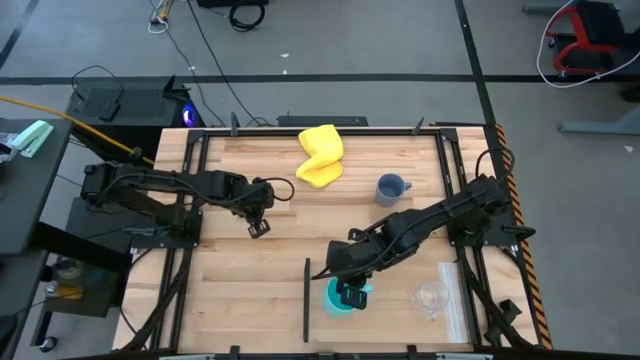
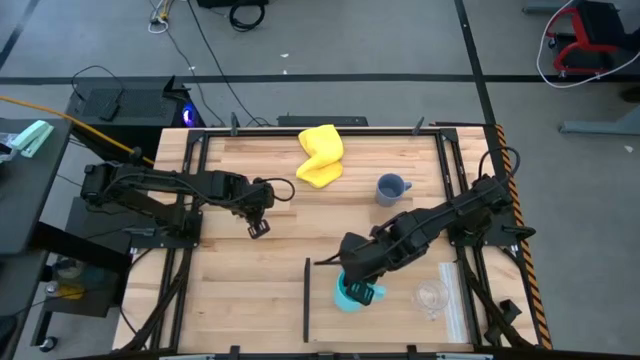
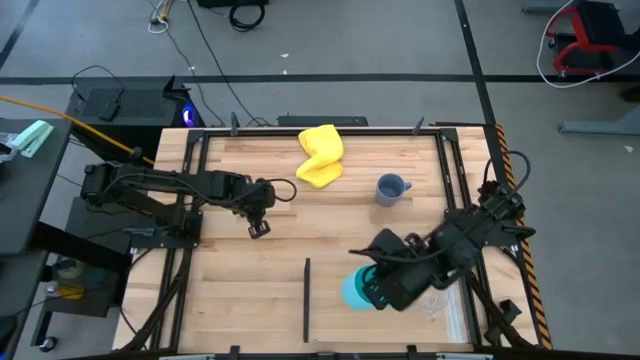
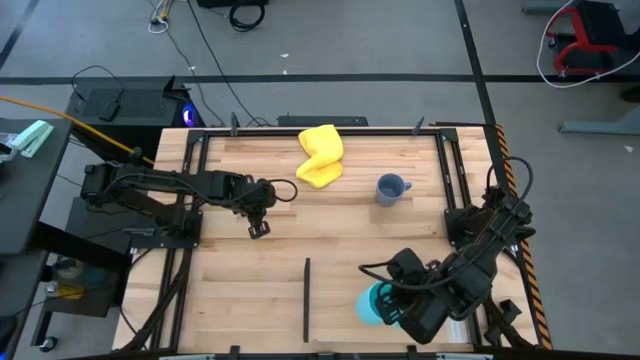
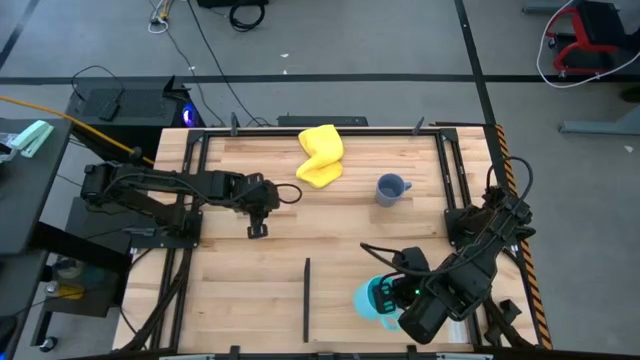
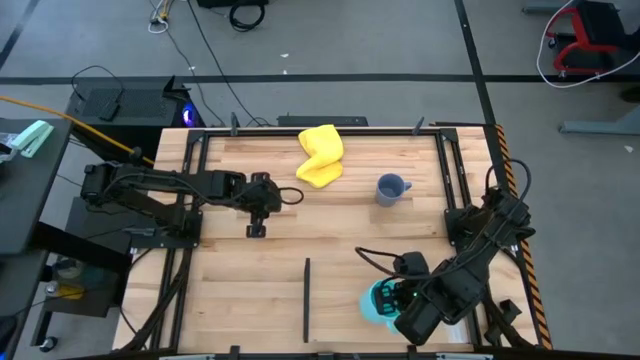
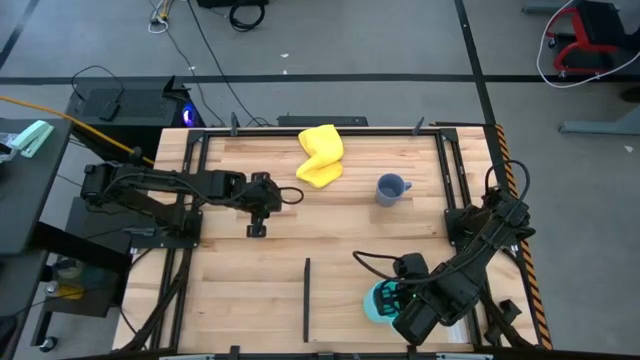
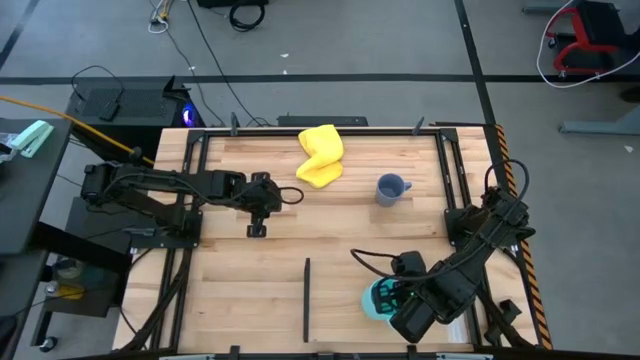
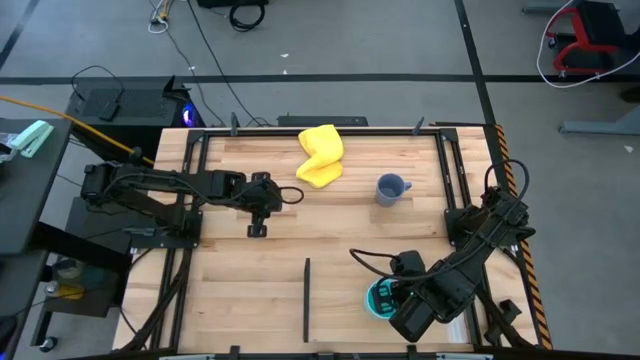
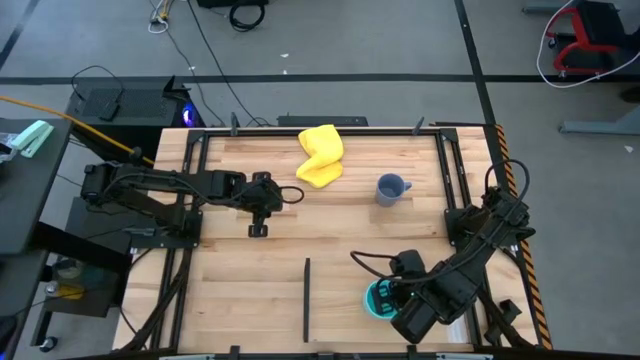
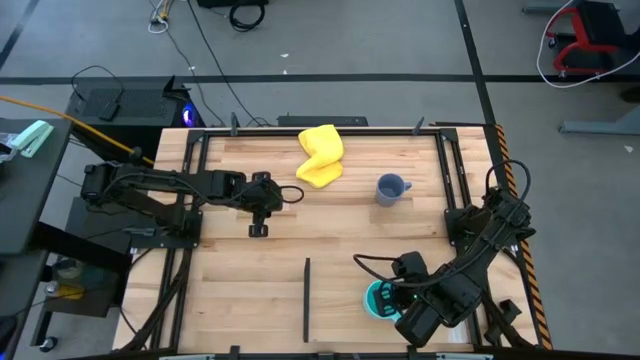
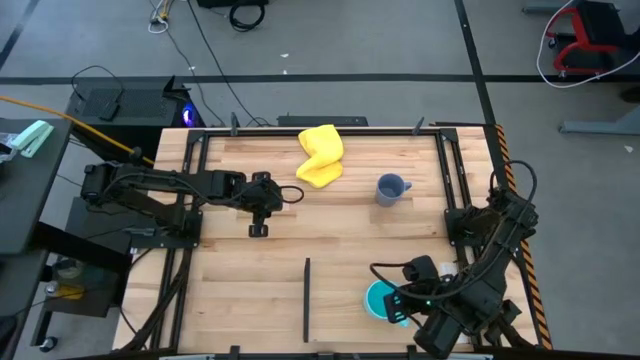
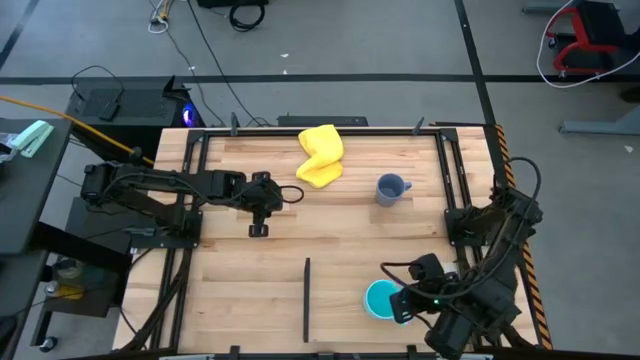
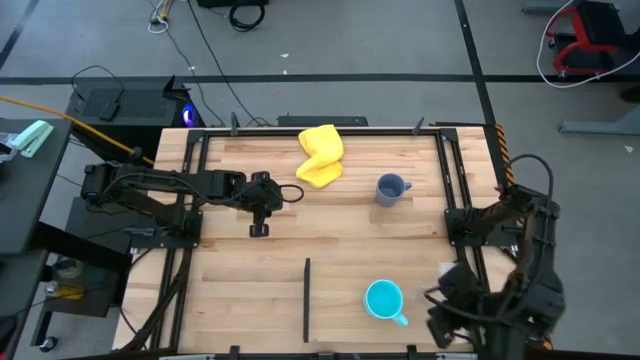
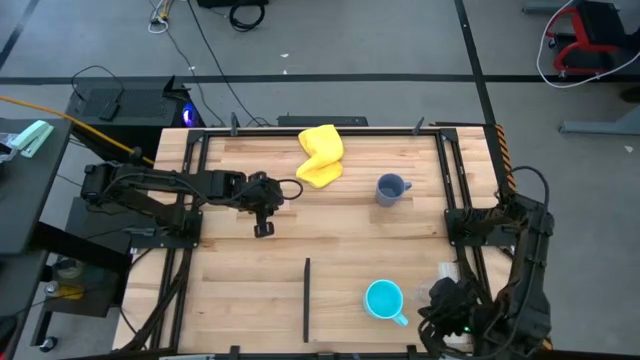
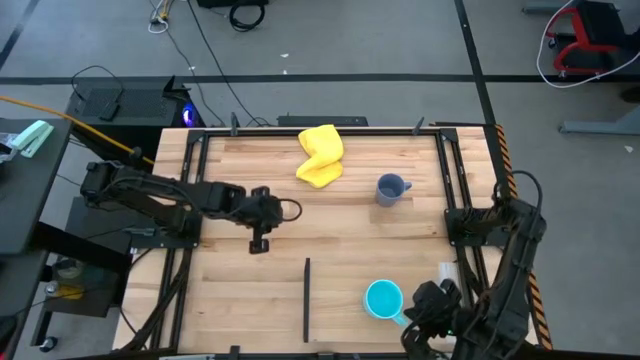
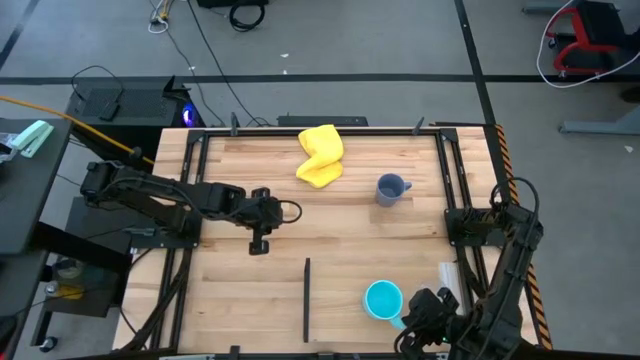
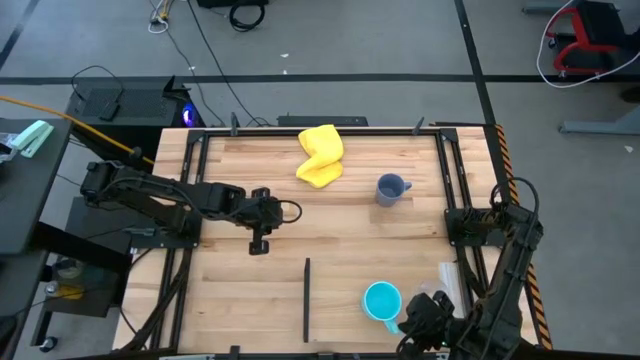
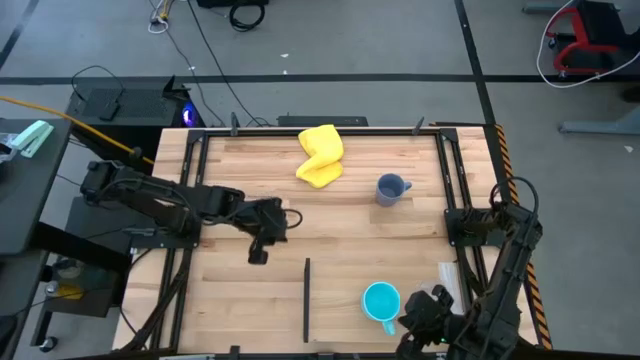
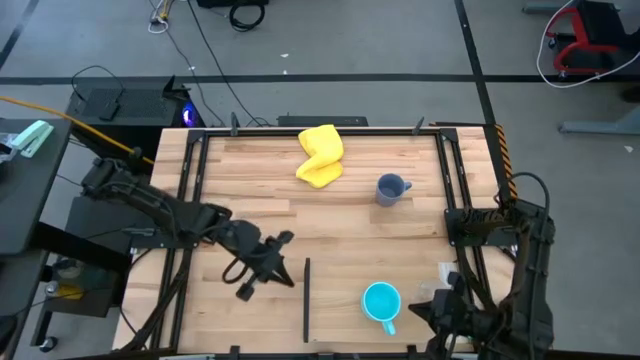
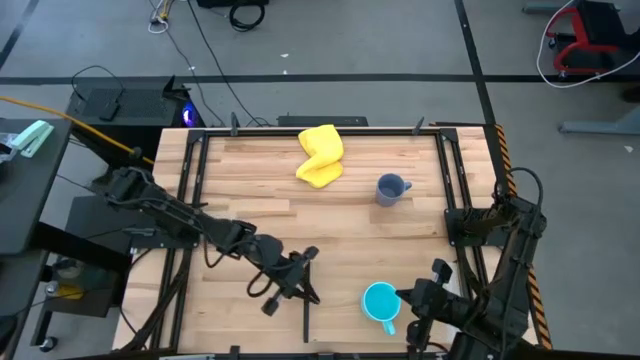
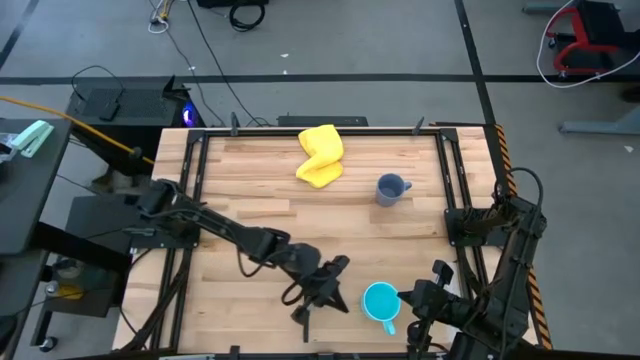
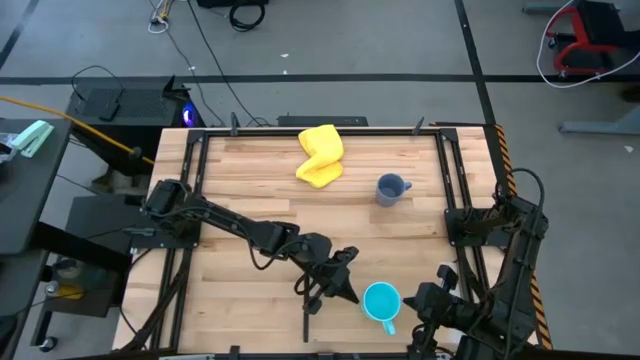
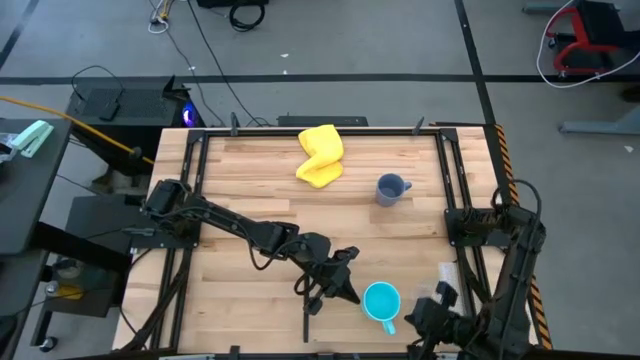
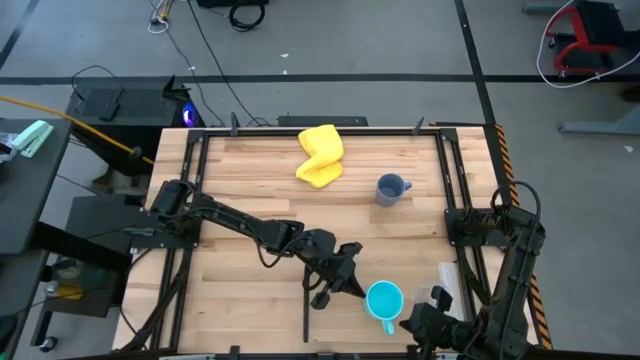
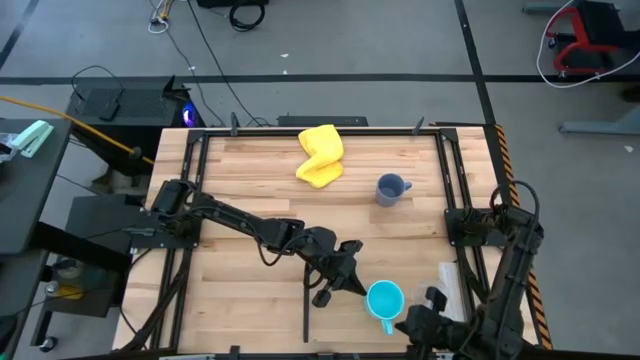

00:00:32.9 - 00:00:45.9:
Task: Stack small to large cups/mugs on shelf
Put the blue mug on the shelf

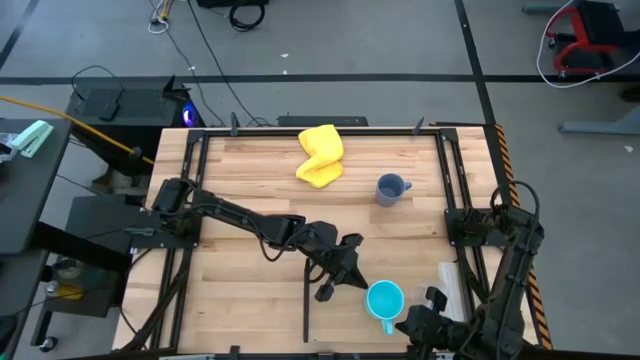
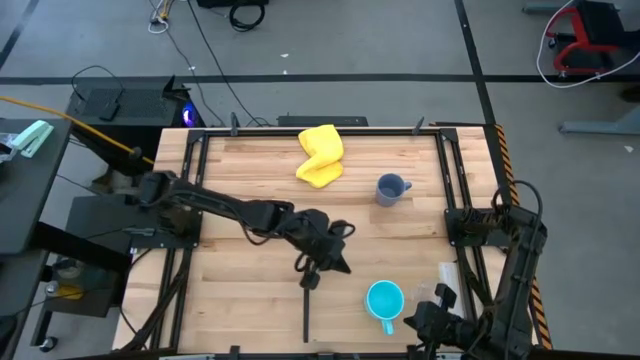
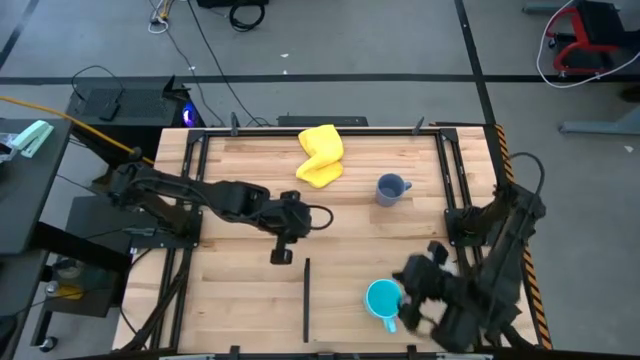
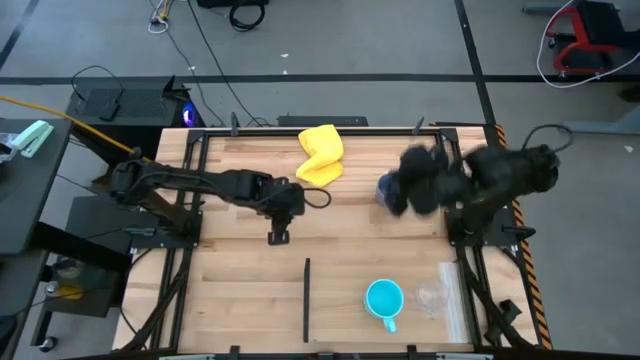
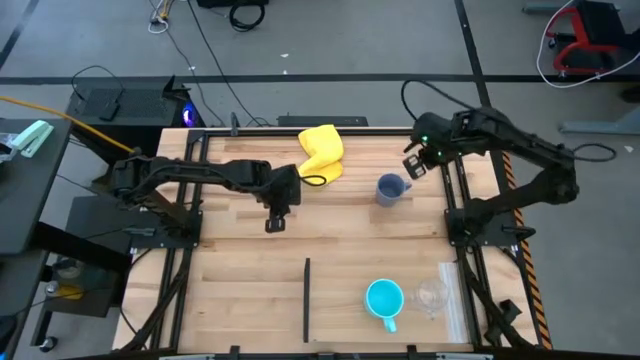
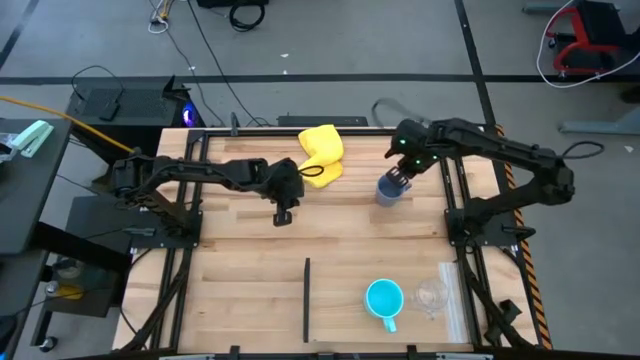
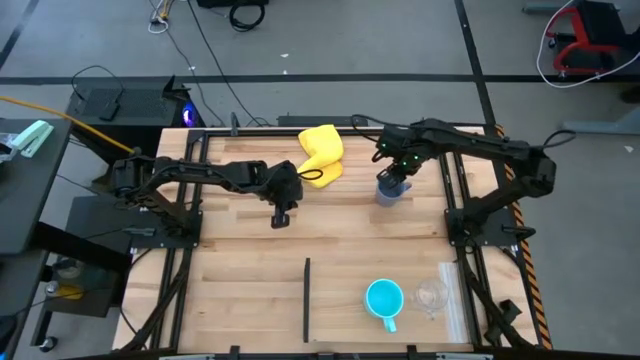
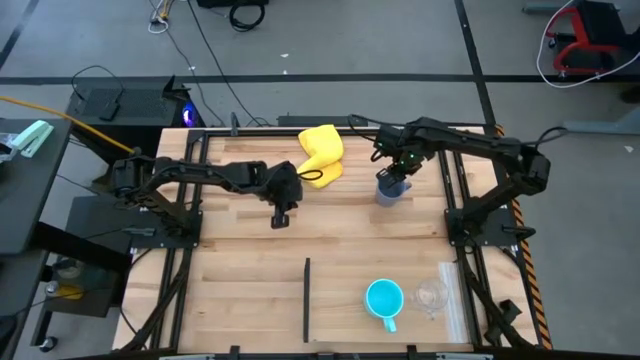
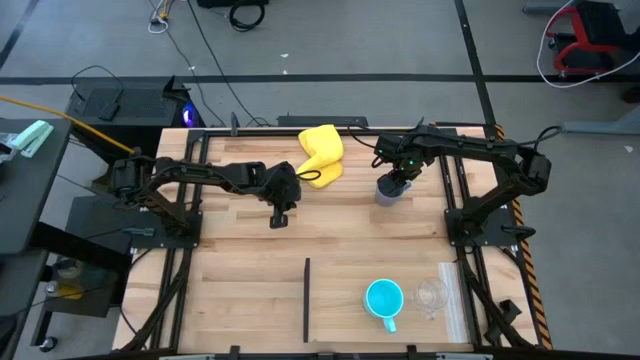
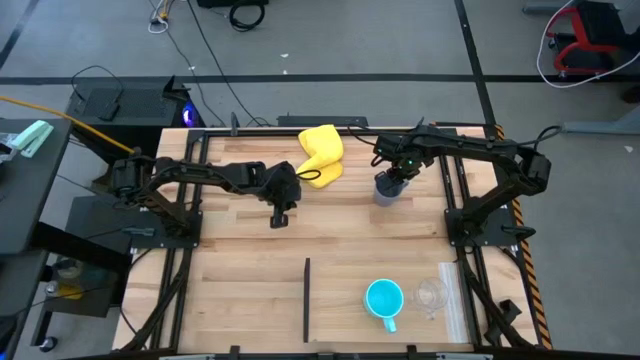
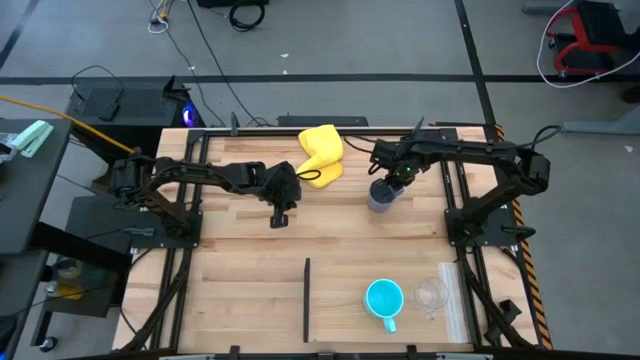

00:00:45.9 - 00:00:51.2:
Put the violet mug on the shelf

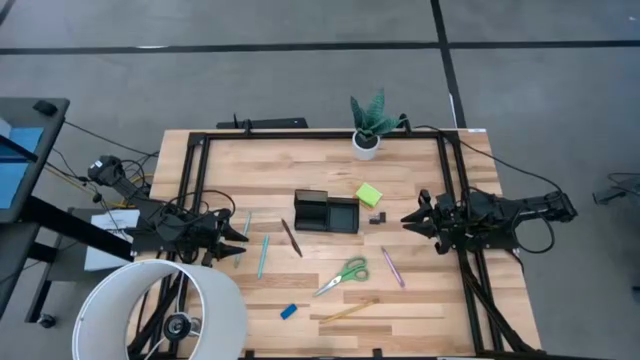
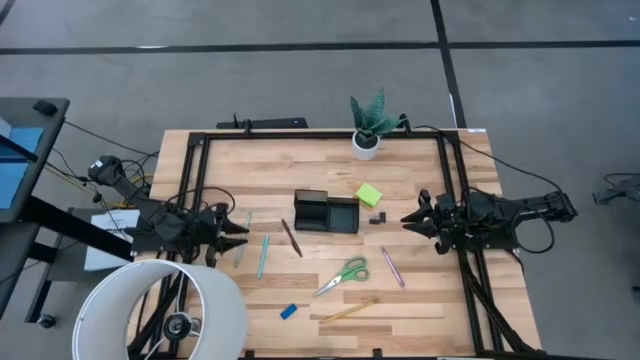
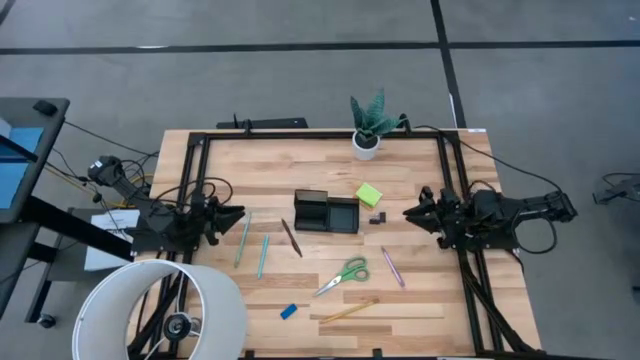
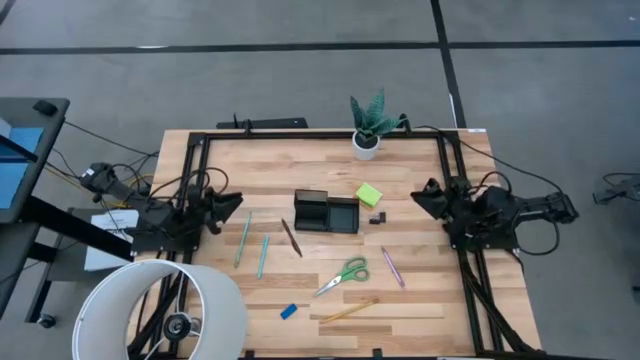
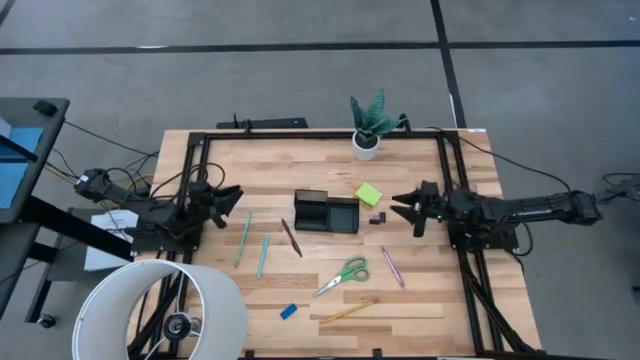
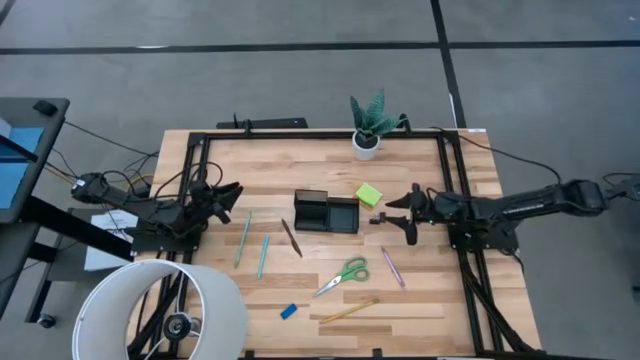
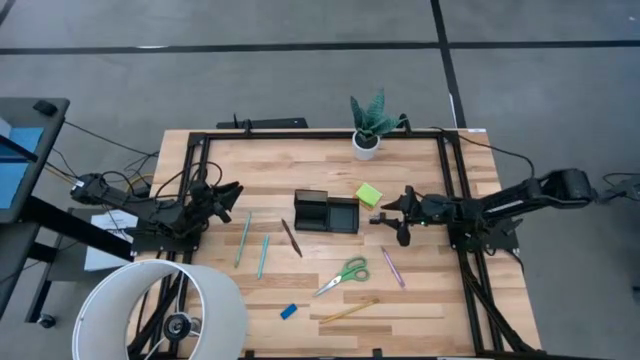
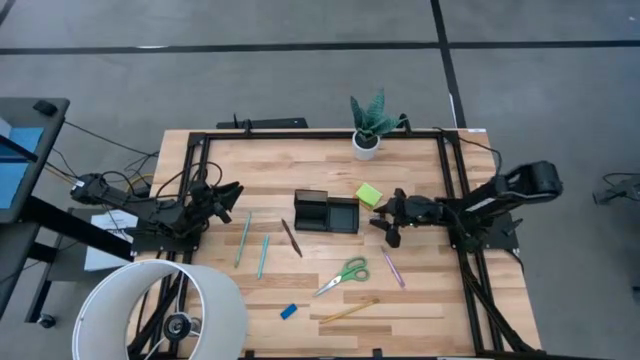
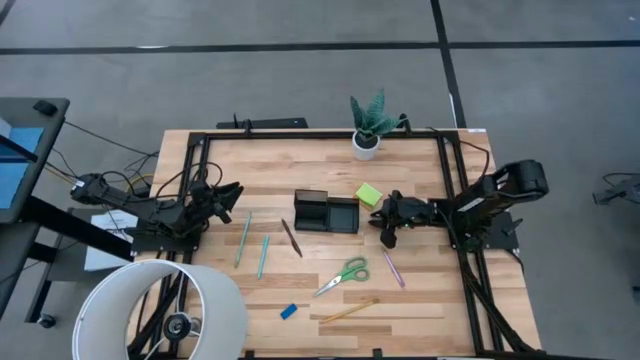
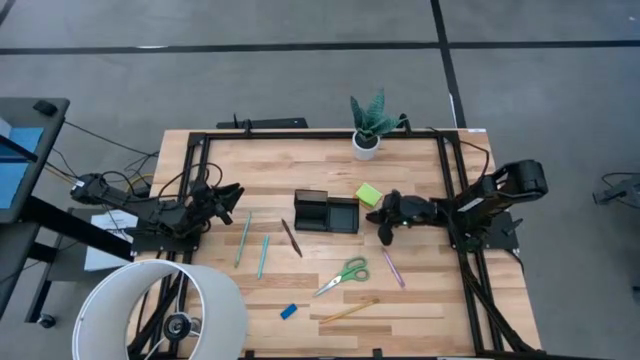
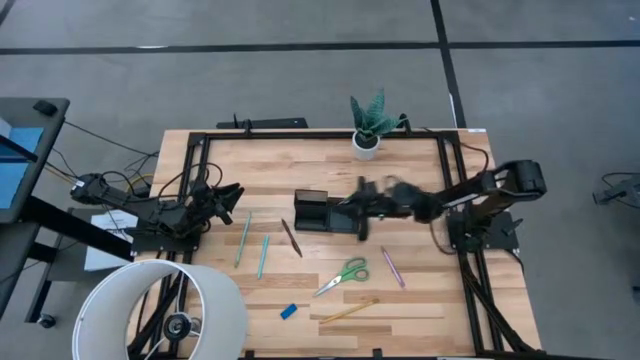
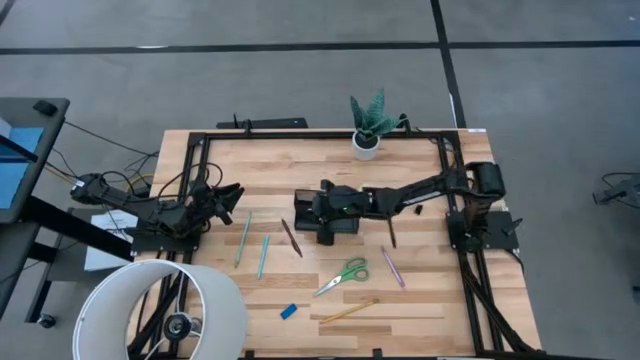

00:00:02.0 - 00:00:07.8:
Task: Pick and place office supplies into organizer
Put the left black binder clip into the black desk organizer
